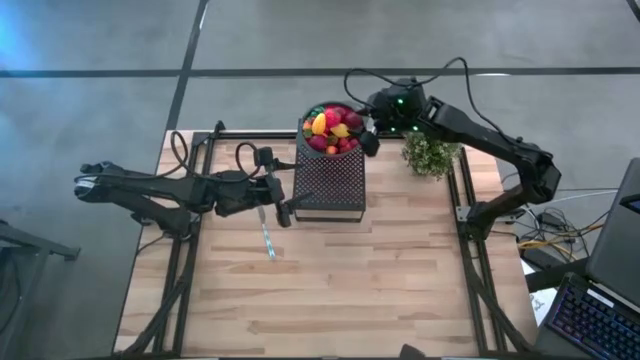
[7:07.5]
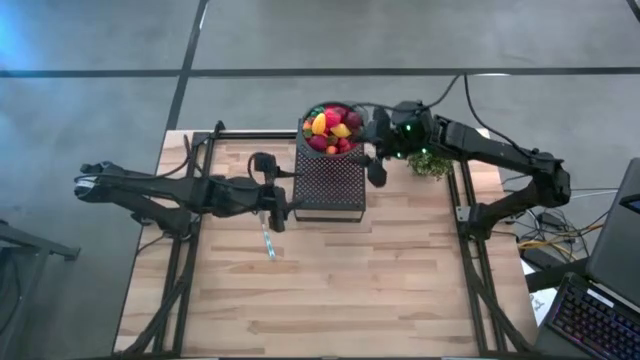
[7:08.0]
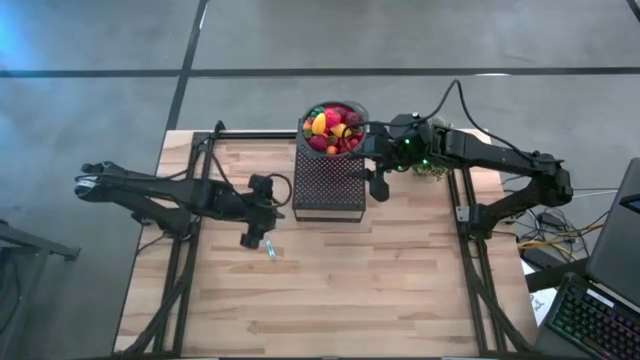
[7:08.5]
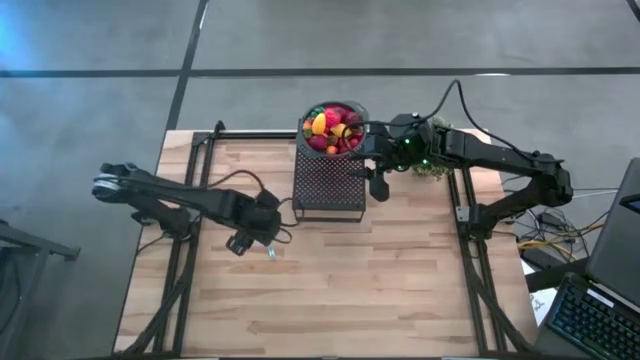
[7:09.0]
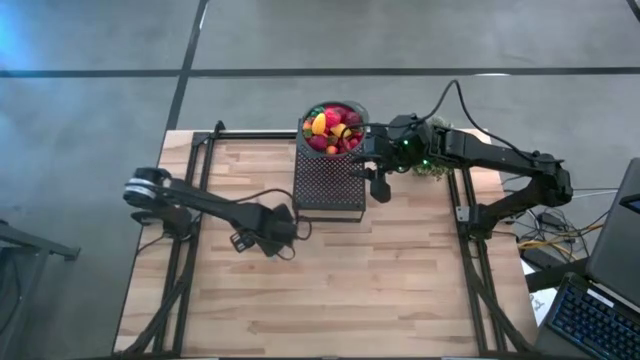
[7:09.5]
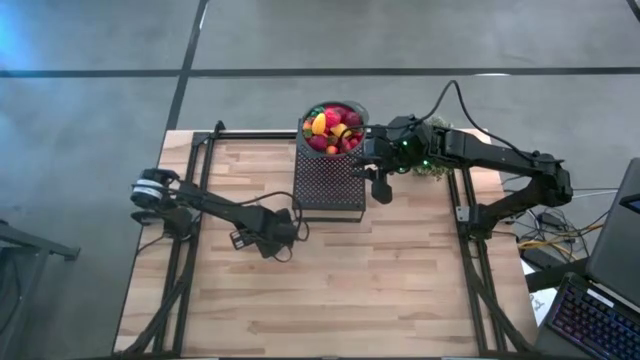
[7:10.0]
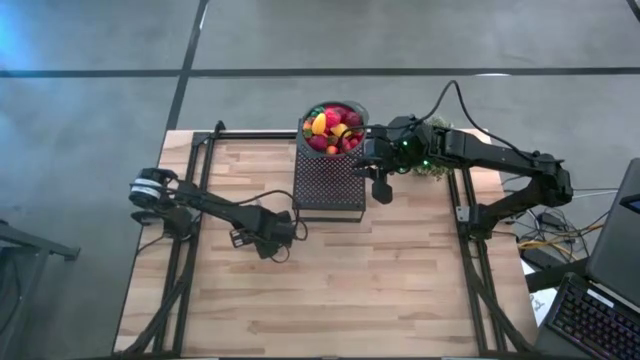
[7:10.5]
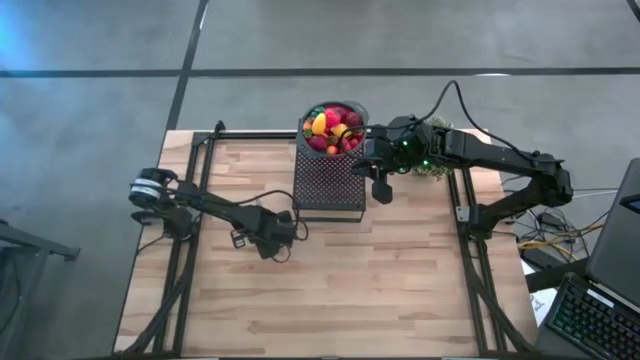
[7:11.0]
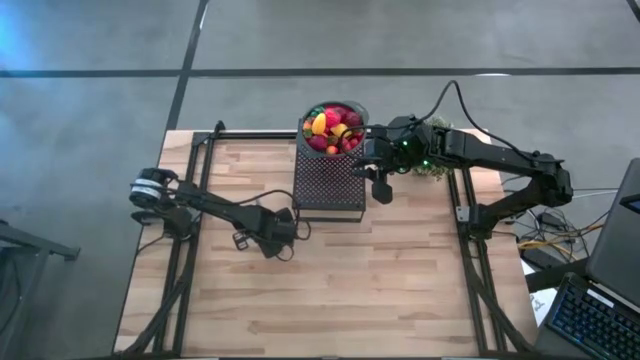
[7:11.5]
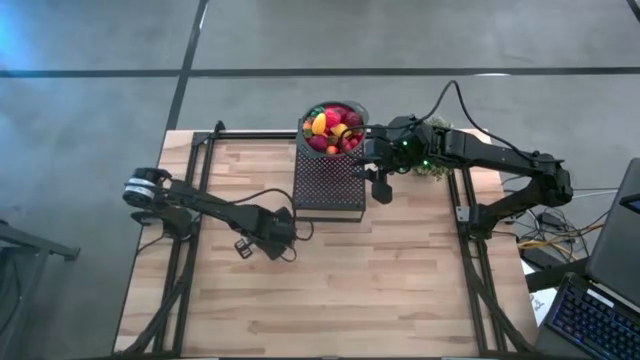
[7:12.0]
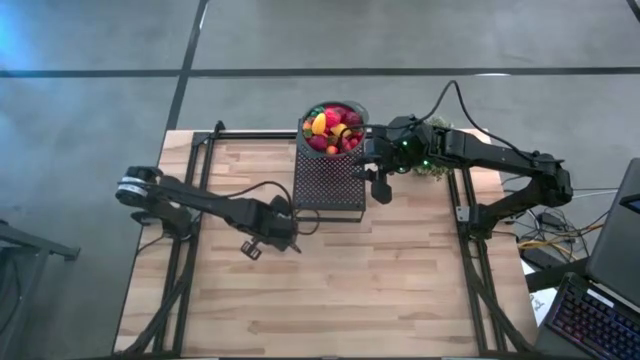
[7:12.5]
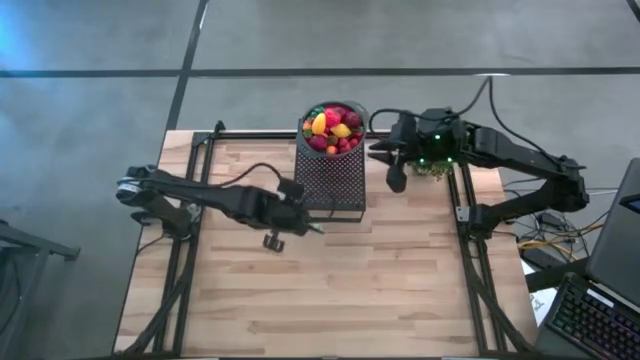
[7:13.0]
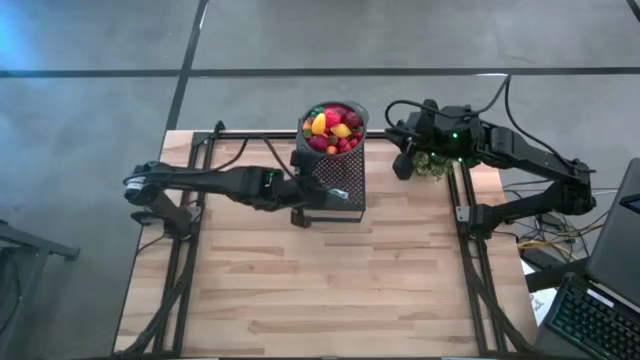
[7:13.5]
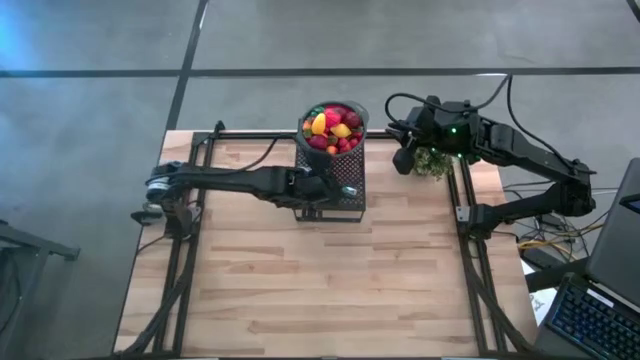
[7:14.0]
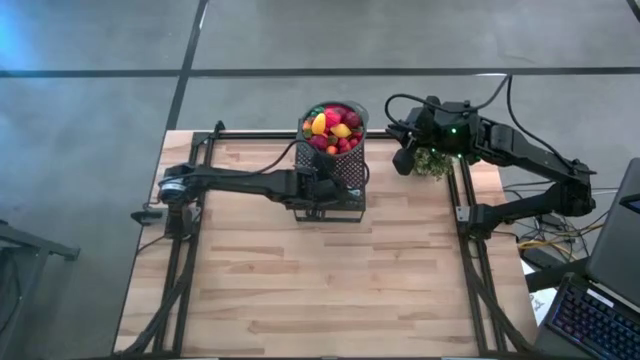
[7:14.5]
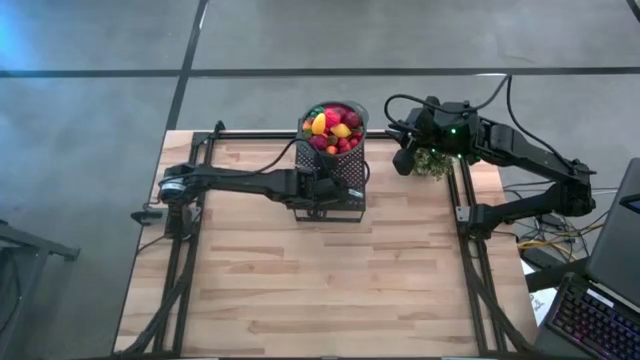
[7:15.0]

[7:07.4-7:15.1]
Task: Pick & Place Fruit
Put the knife on the shelf

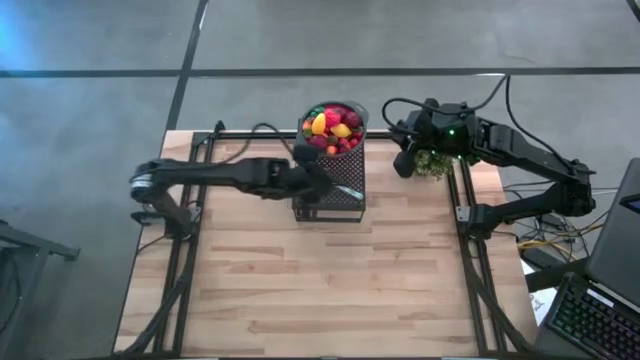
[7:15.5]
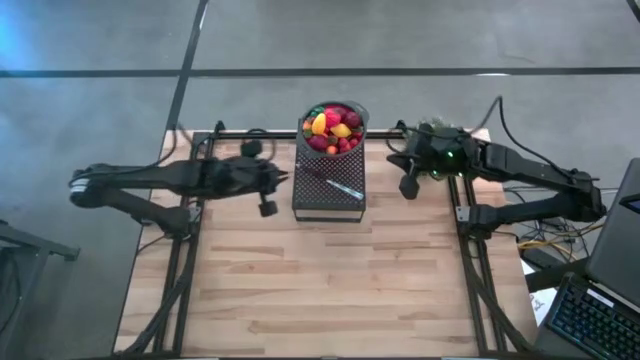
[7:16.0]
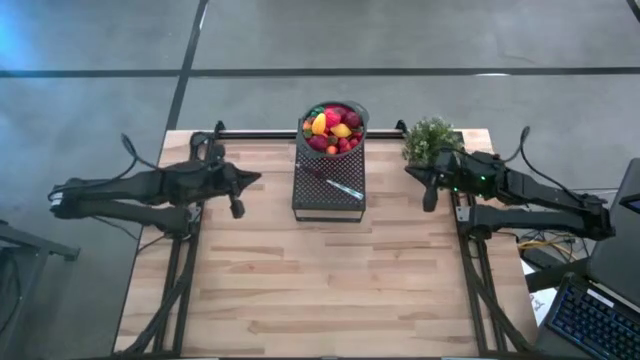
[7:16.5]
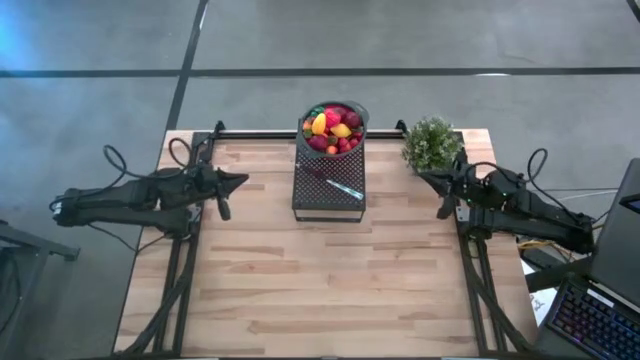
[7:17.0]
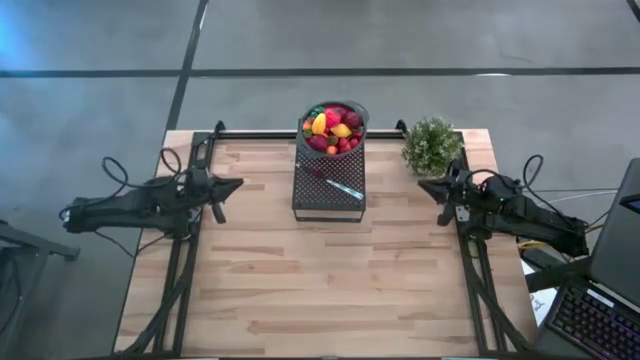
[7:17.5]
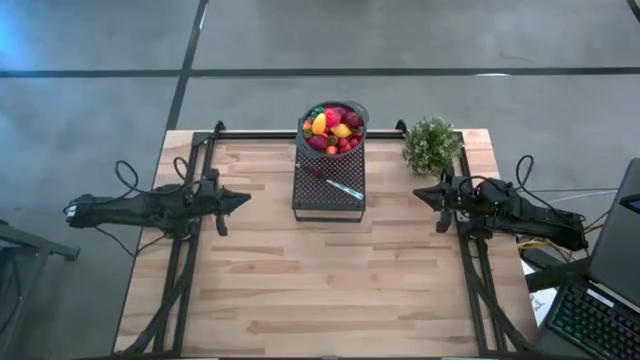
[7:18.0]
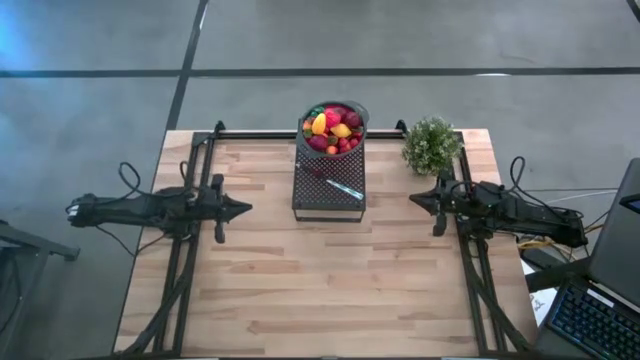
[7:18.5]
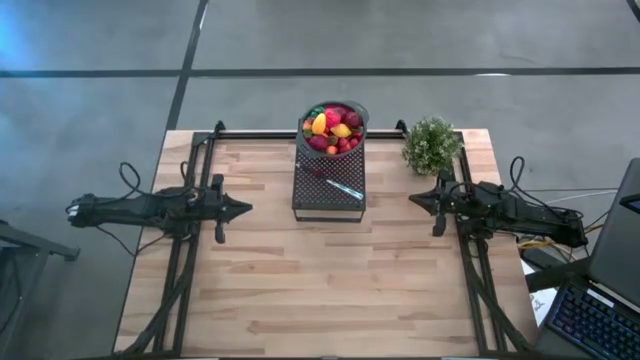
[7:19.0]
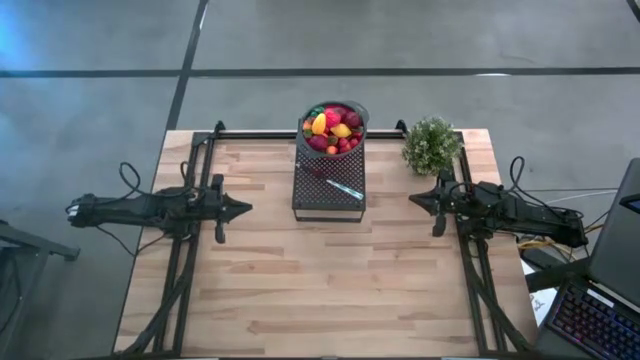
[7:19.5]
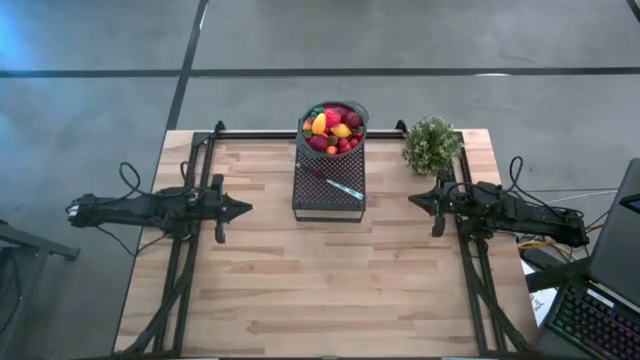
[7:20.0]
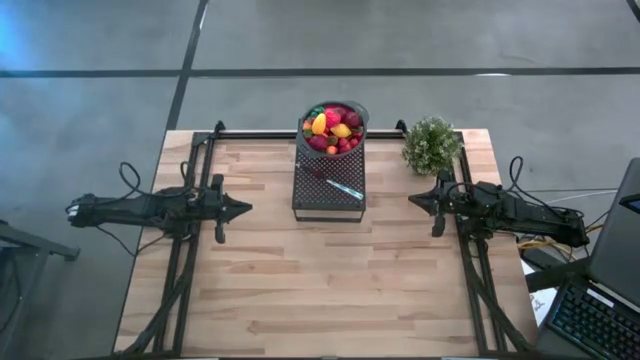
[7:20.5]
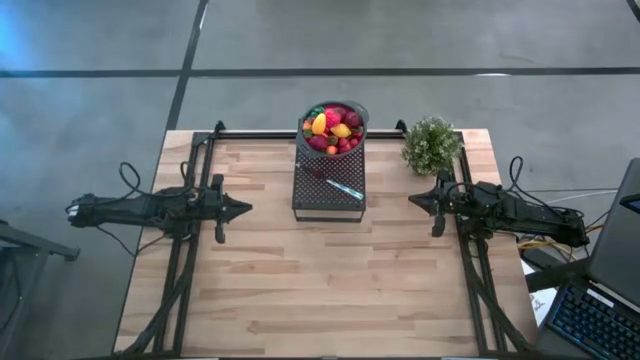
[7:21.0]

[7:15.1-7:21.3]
Return to Home Position

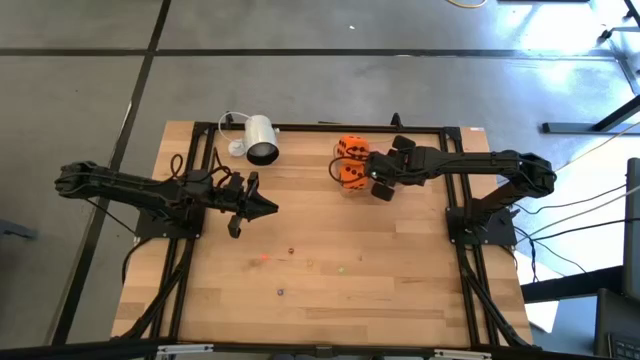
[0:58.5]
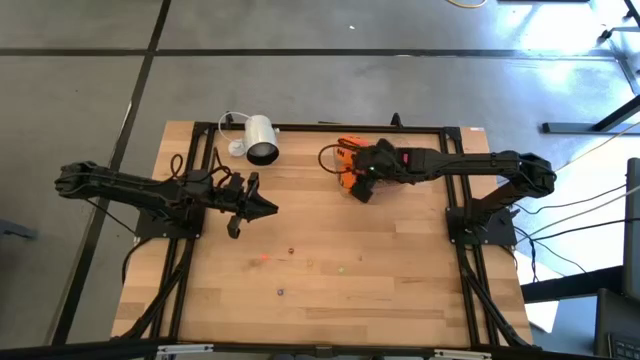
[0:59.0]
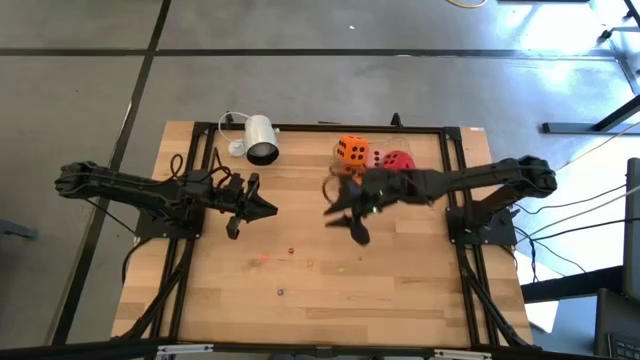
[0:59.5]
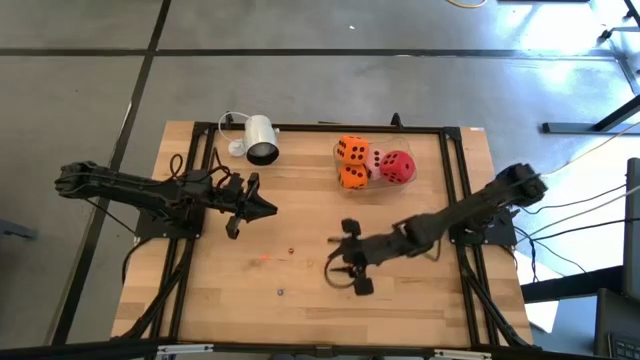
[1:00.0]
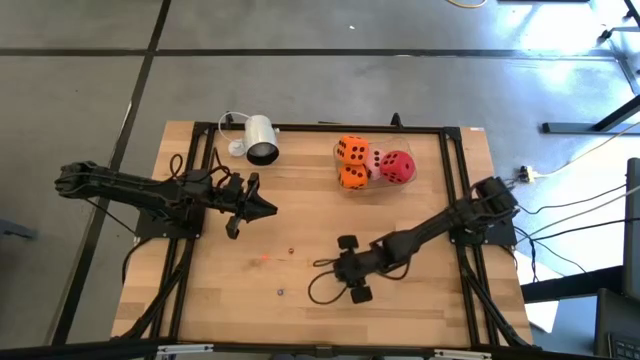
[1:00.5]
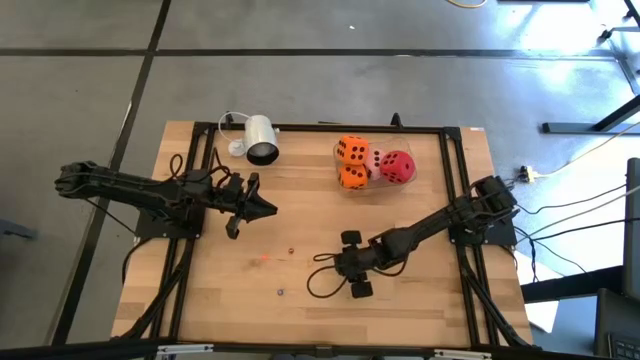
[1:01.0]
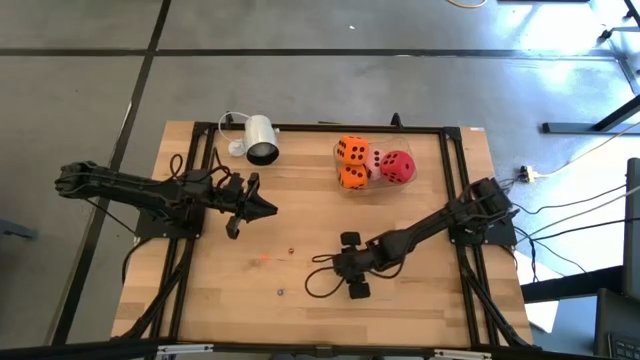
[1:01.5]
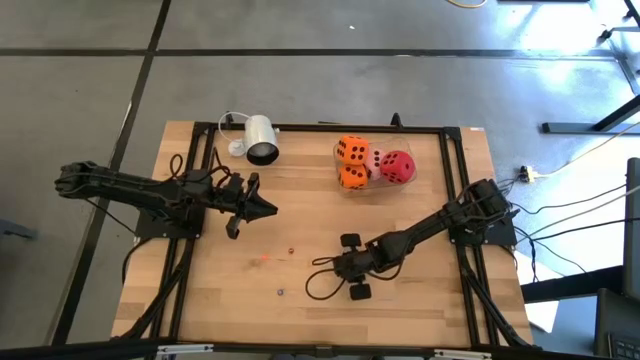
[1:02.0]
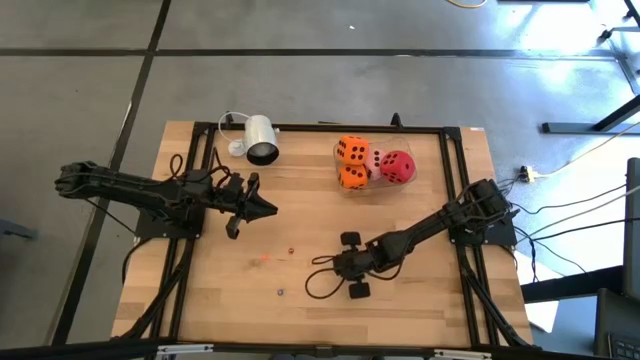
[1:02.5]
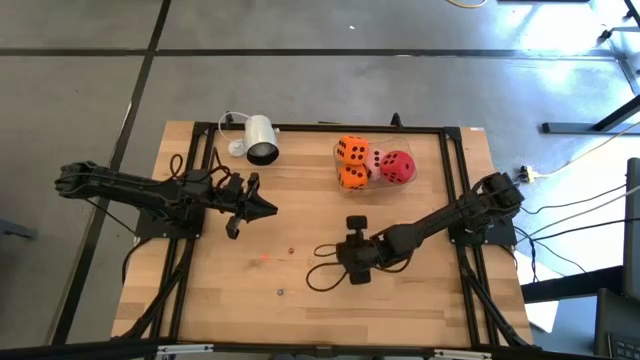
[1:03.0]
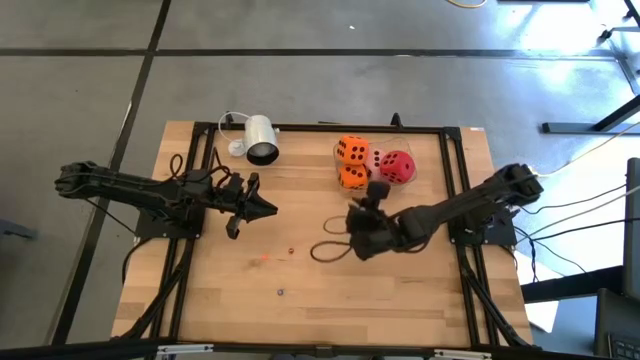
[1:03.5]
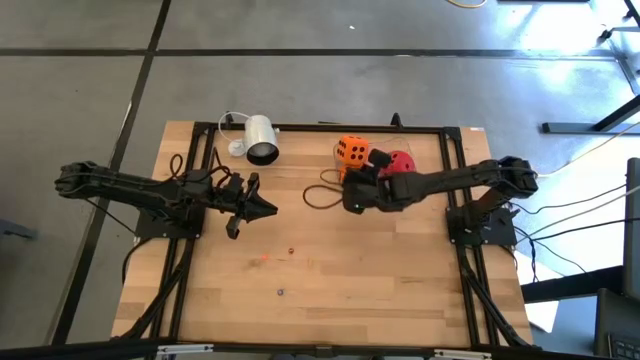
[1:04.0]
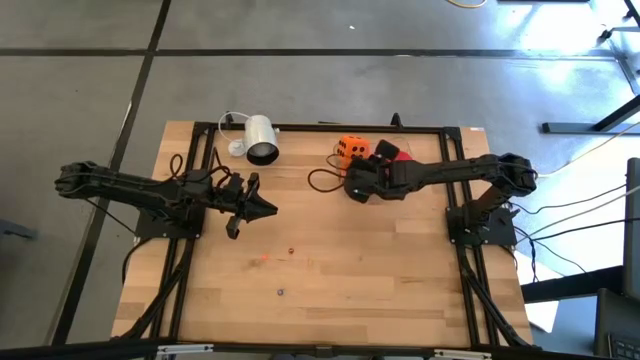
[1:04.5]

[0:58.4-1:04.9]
Task: Pick & Place Dice
Put the small green die into the transparent bin
